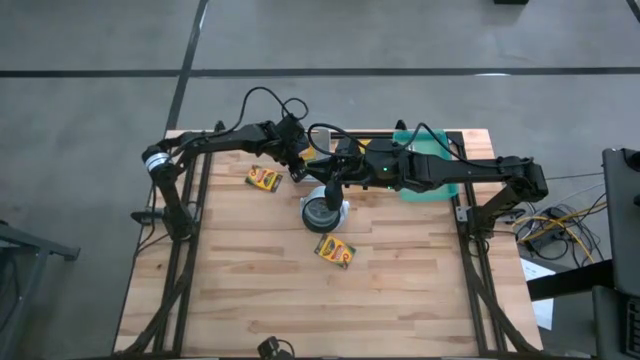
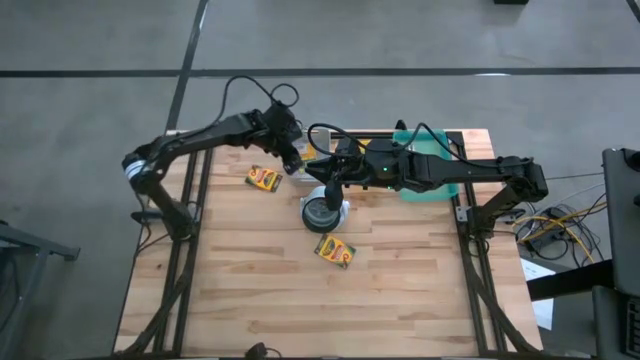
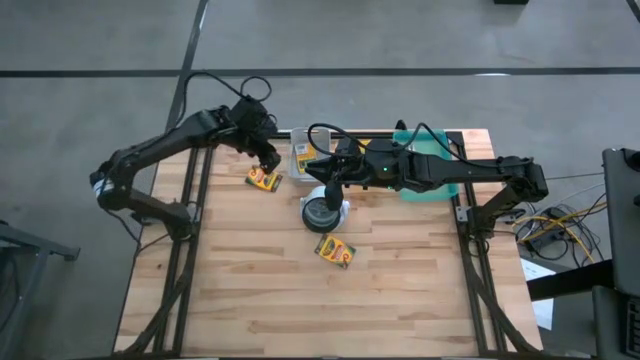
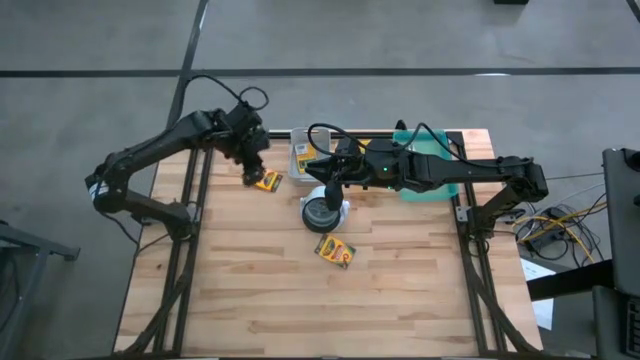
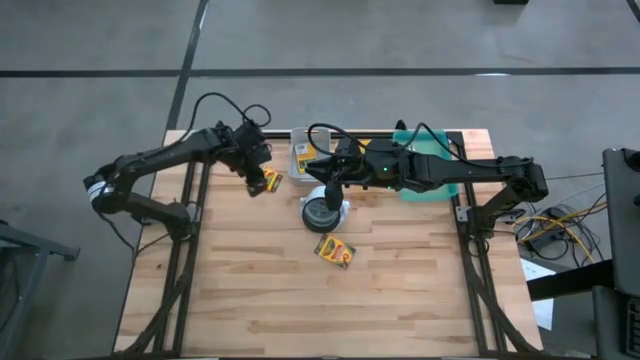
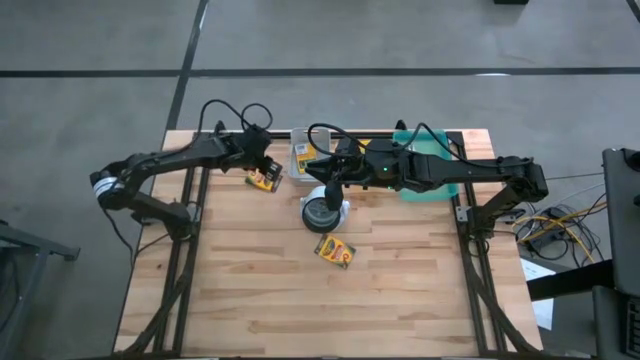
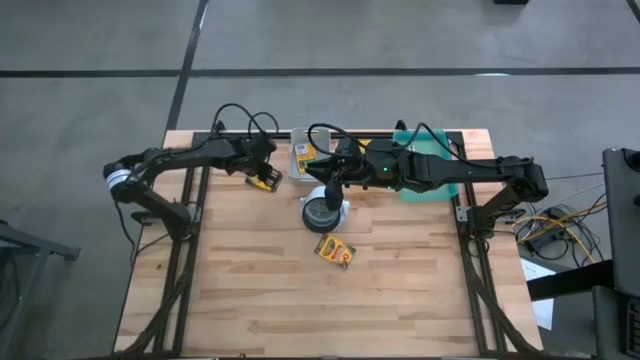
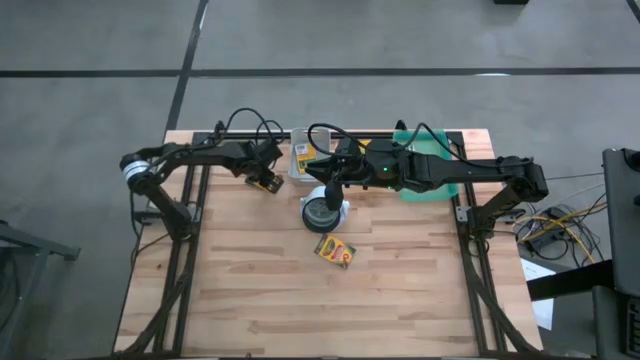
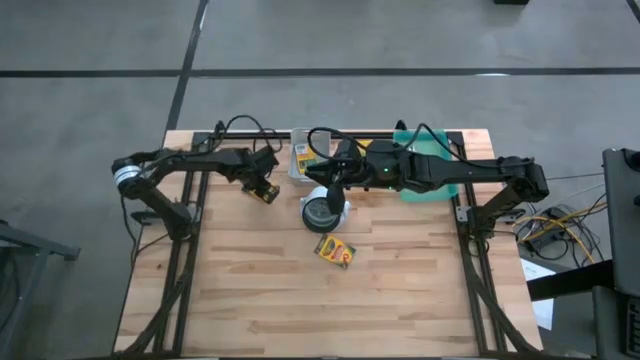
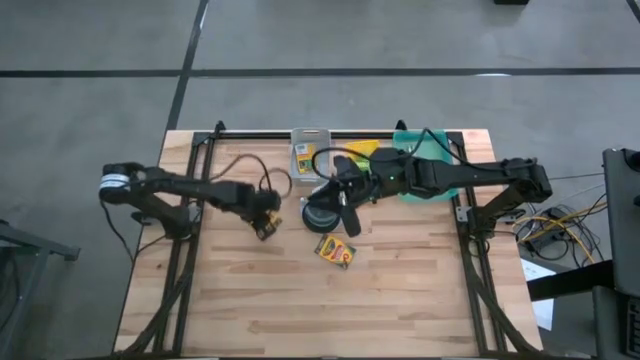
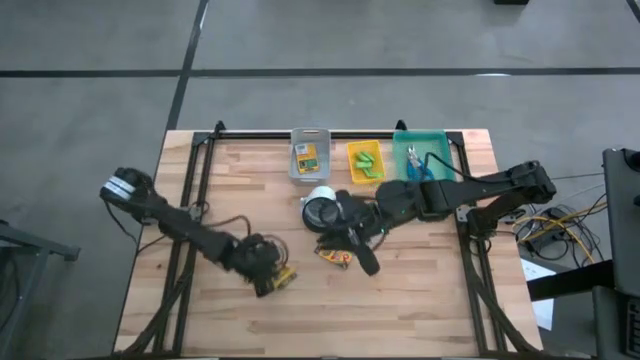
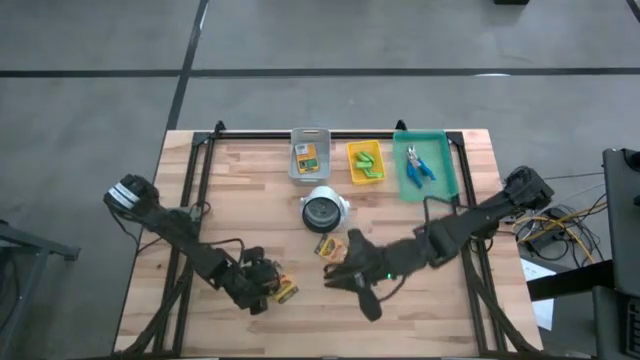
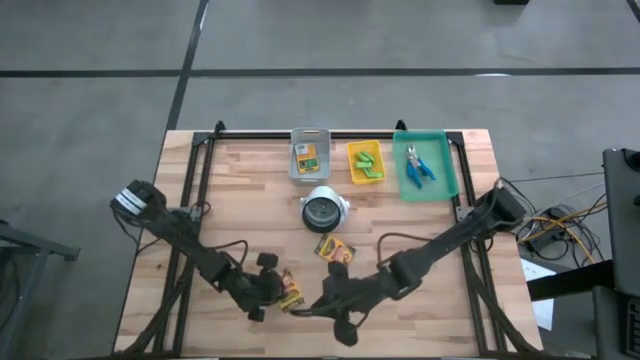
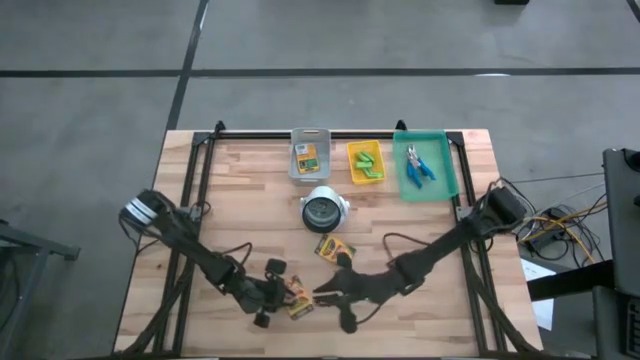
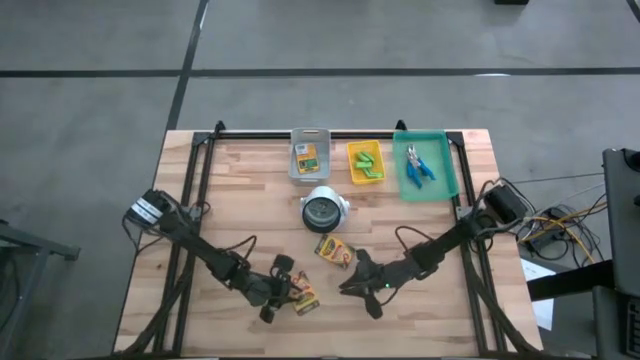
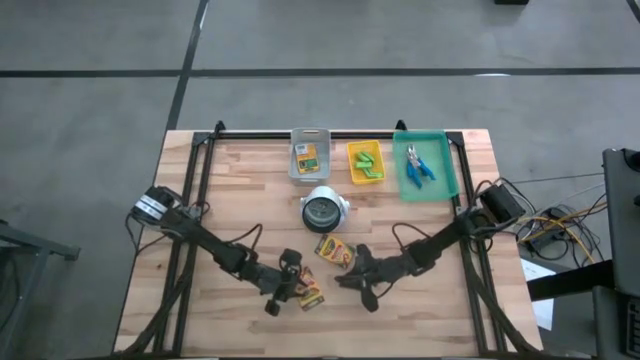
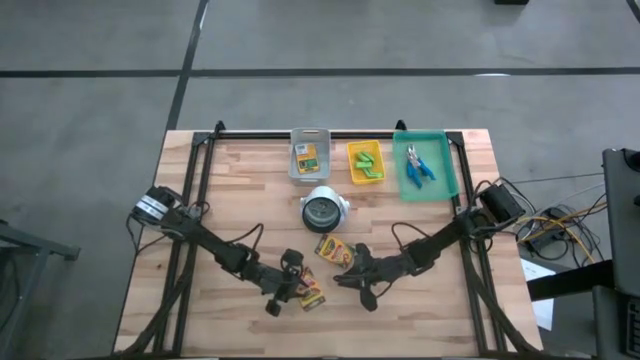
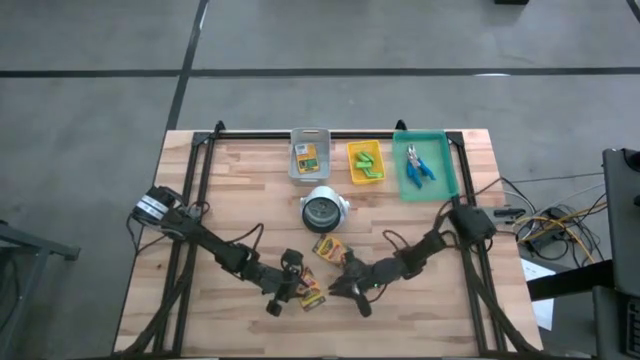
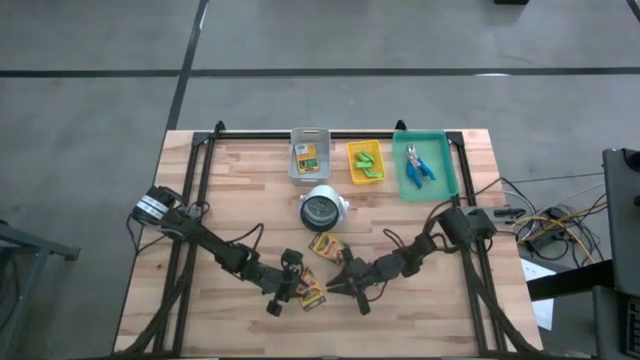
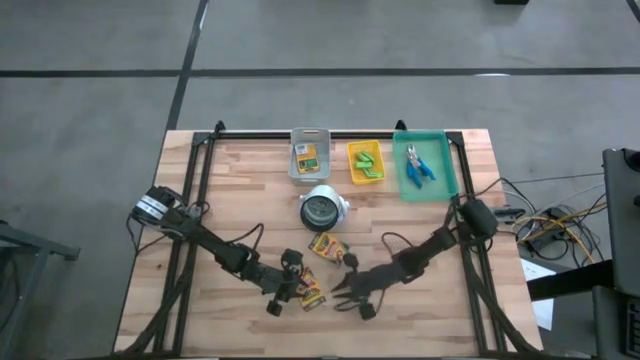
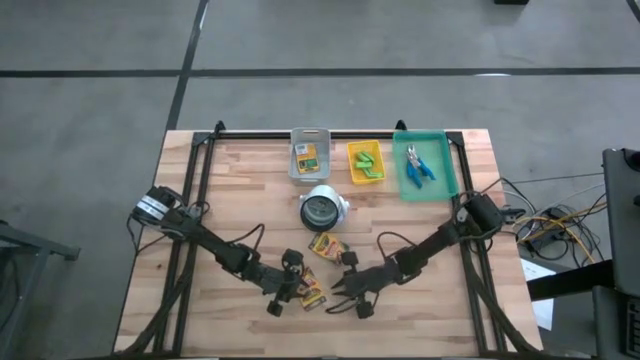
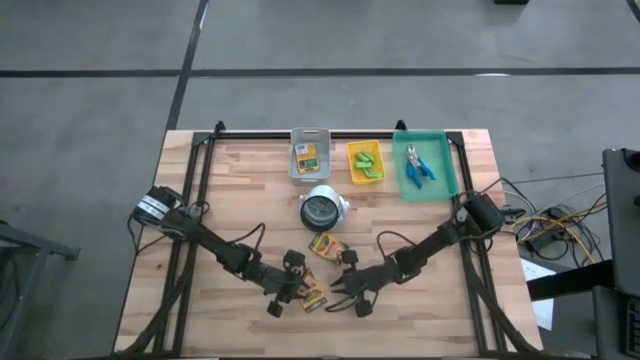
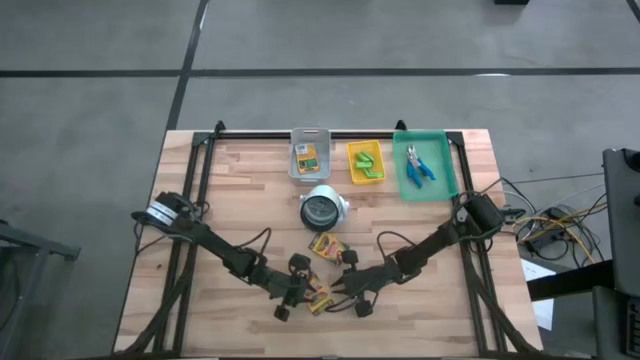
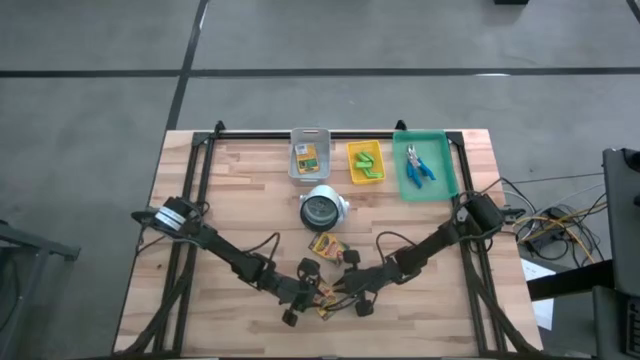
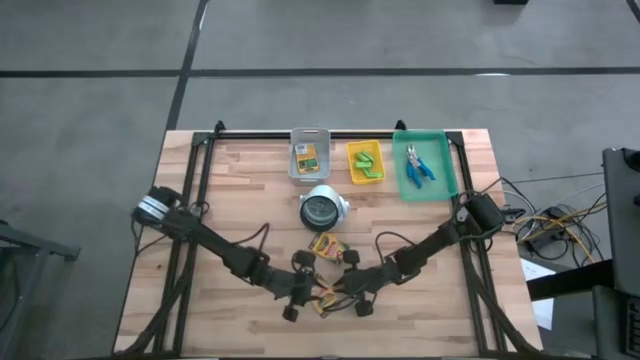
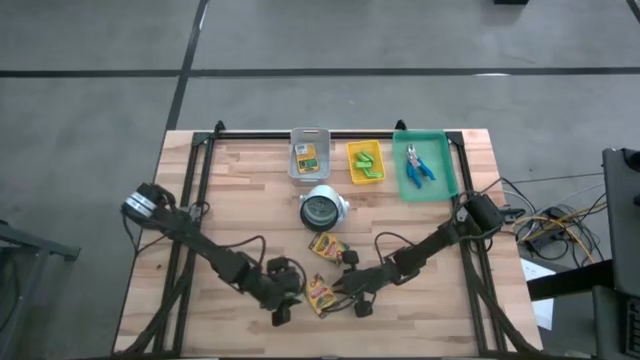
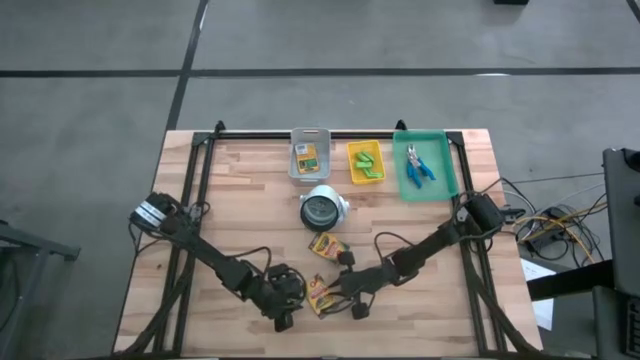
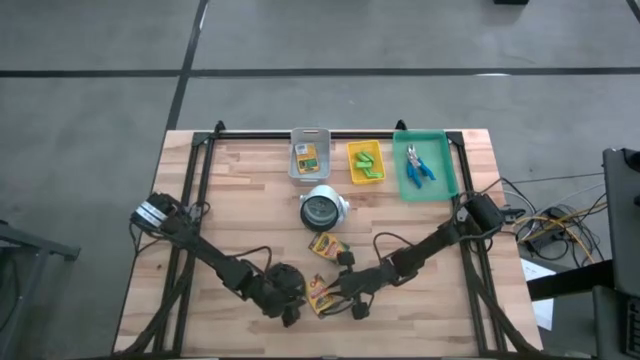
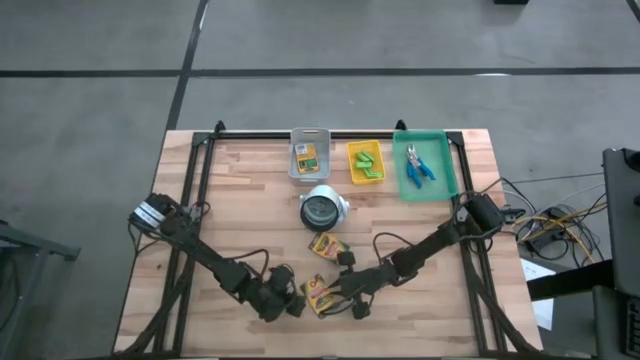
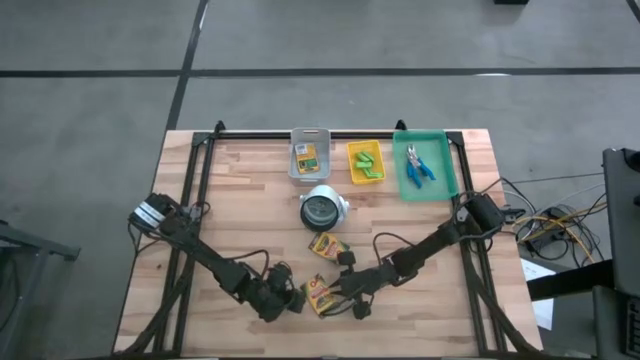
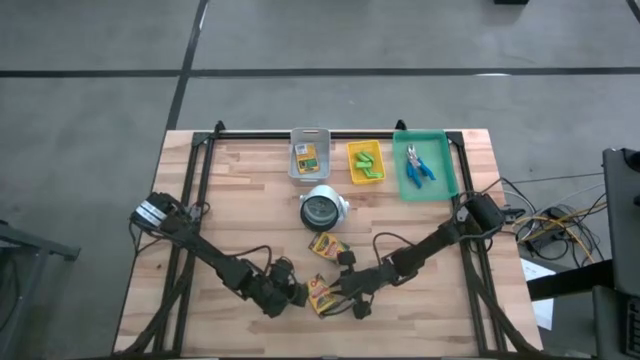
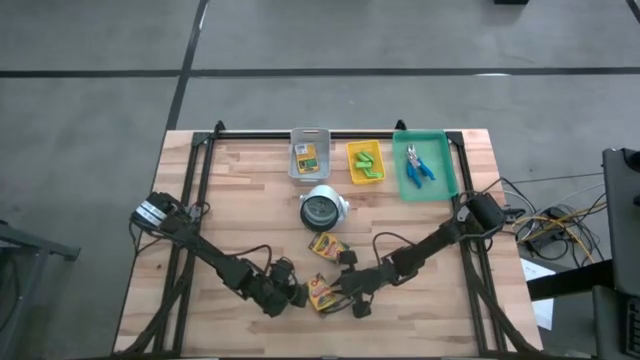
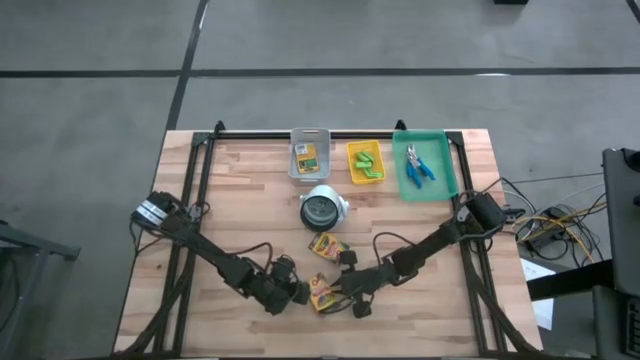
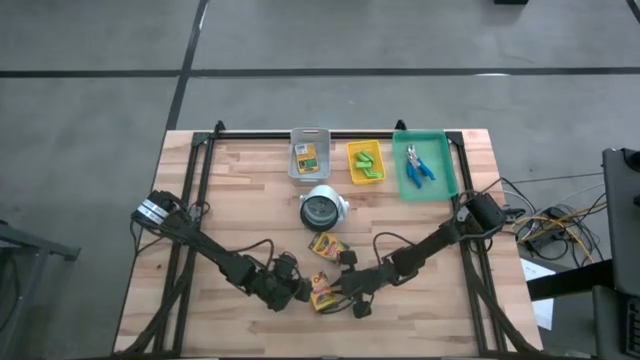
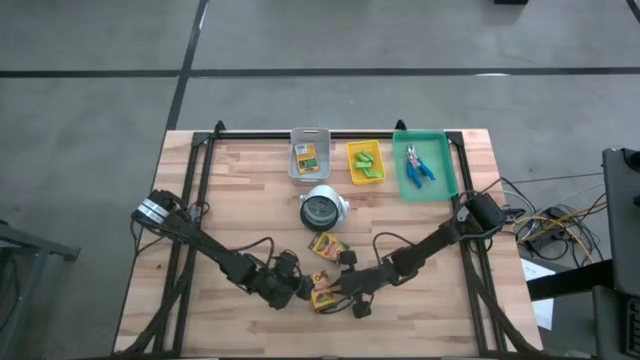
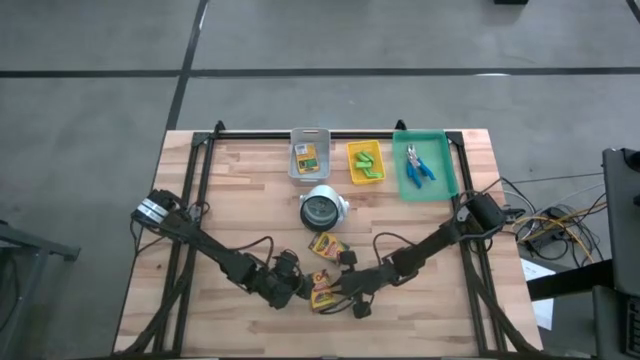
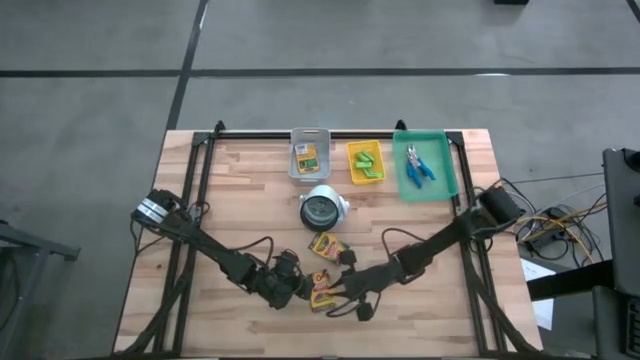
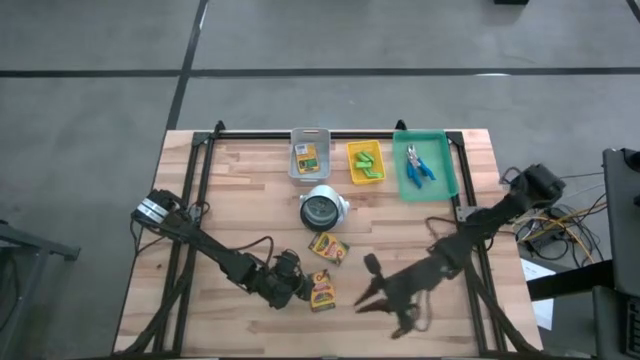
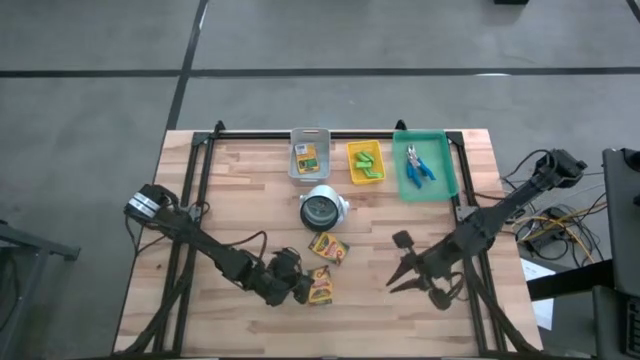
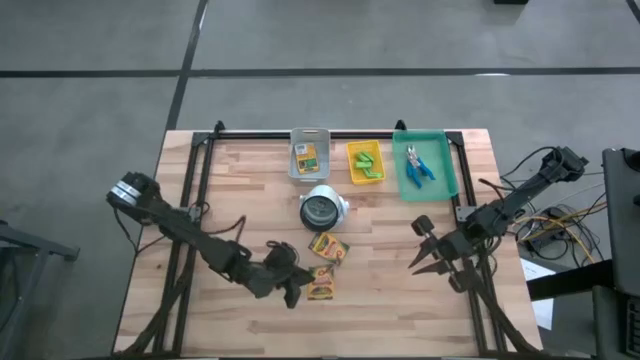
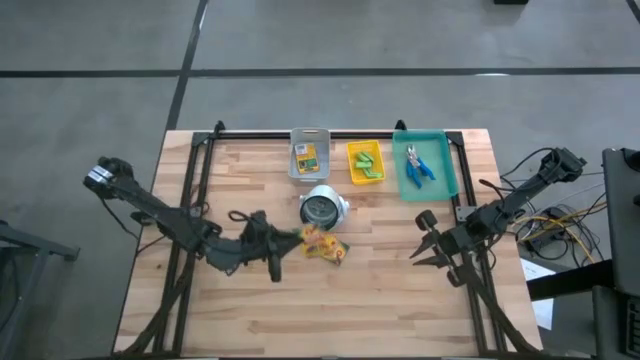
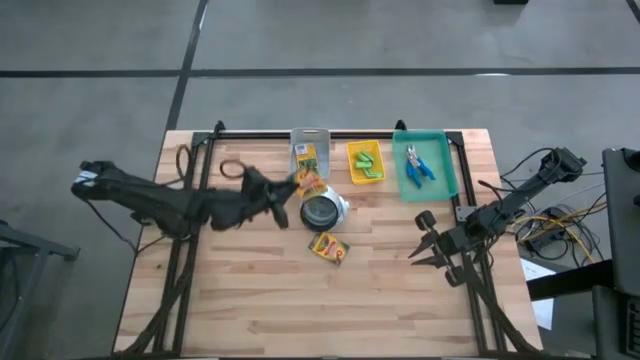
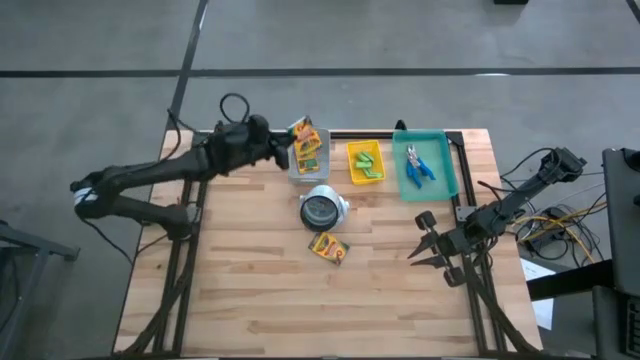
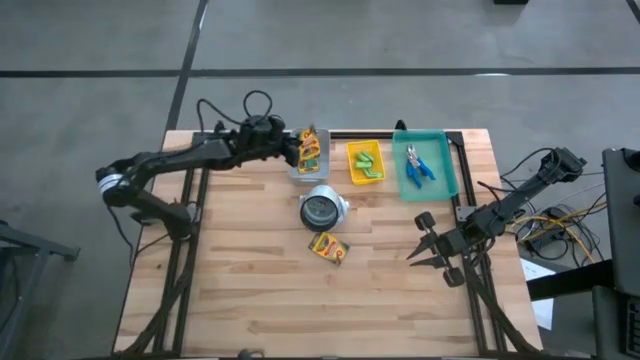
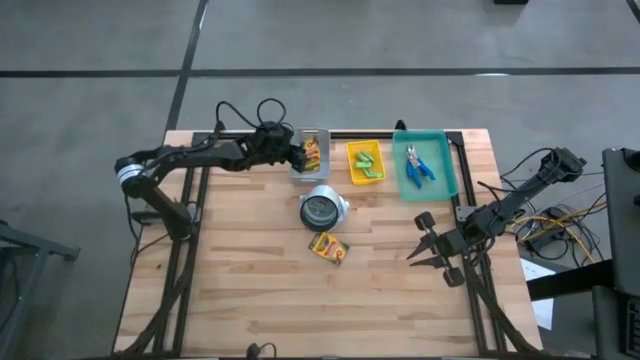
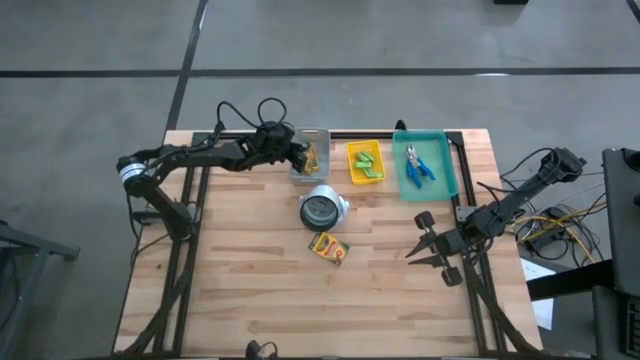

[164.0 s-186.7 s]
Task: Pick & Place School Supplies
Put the pack of crayon into the gray bin
